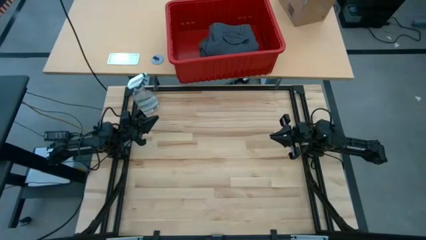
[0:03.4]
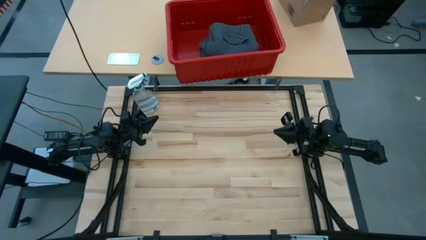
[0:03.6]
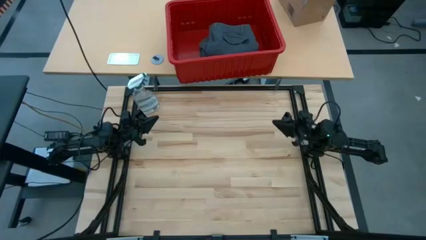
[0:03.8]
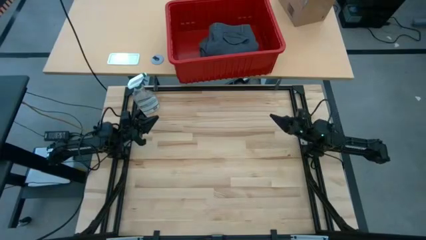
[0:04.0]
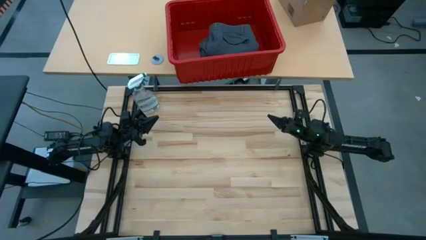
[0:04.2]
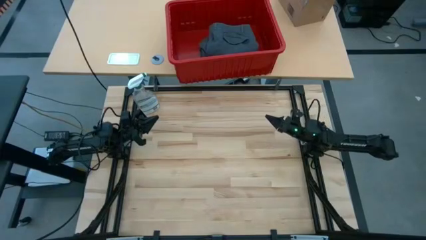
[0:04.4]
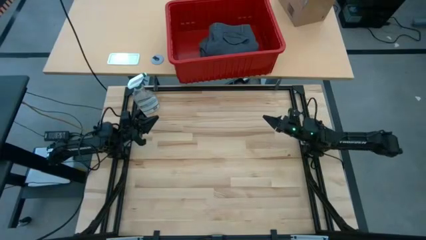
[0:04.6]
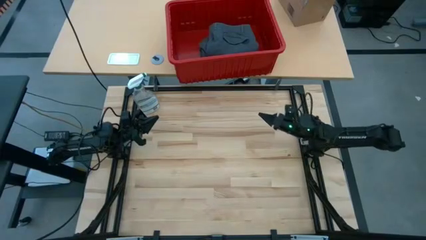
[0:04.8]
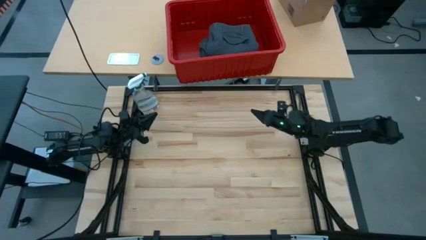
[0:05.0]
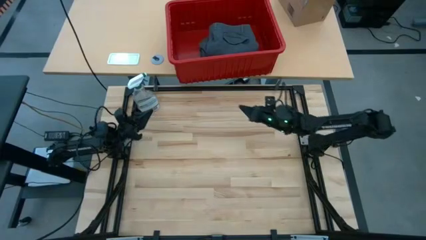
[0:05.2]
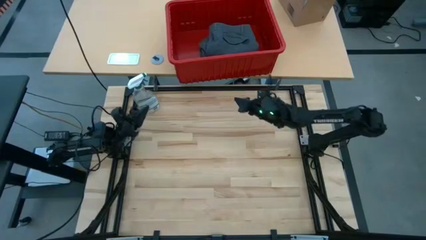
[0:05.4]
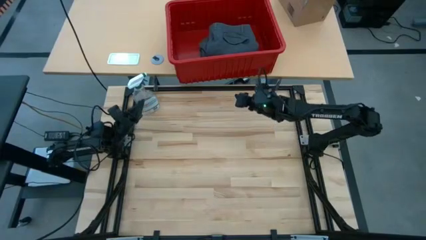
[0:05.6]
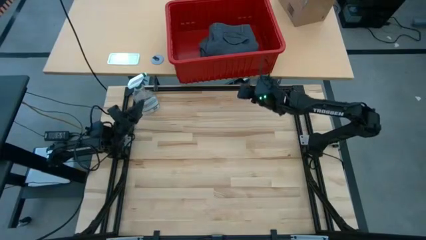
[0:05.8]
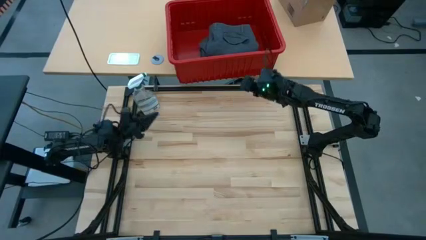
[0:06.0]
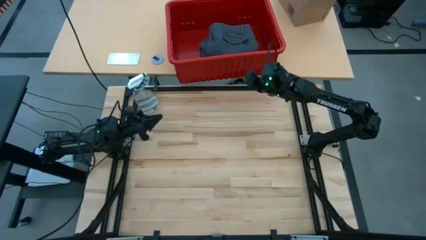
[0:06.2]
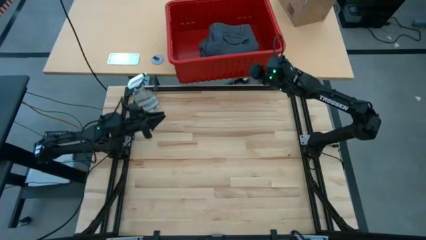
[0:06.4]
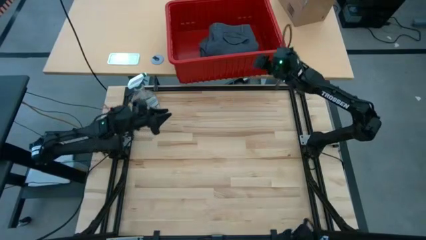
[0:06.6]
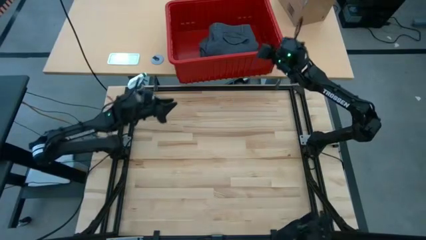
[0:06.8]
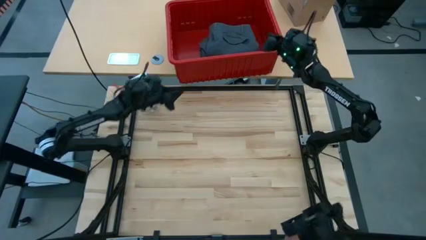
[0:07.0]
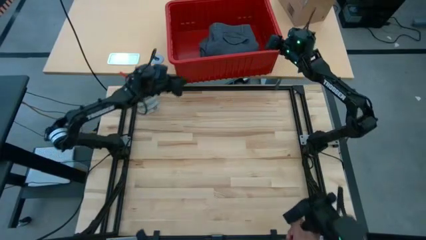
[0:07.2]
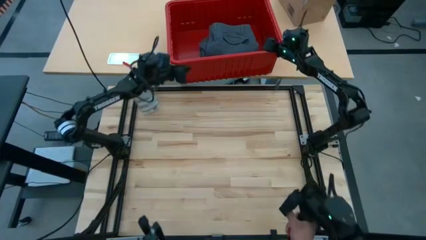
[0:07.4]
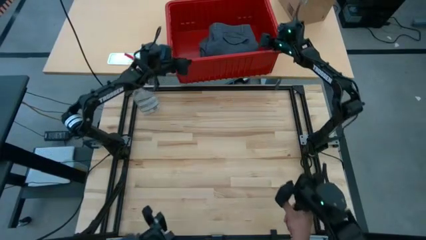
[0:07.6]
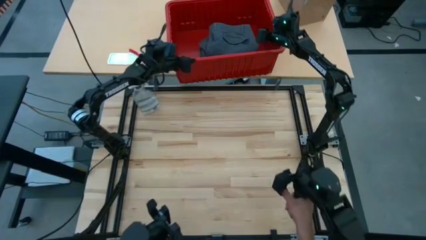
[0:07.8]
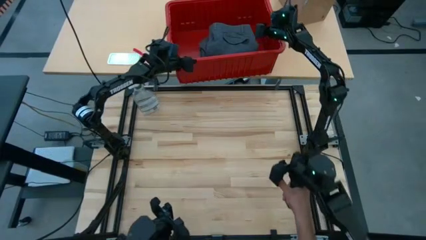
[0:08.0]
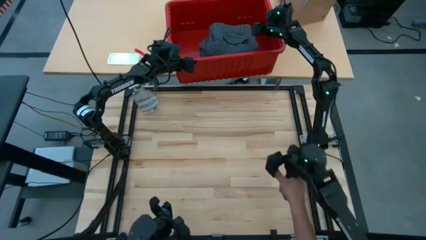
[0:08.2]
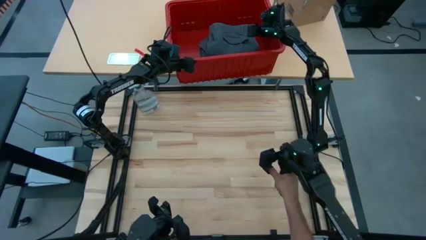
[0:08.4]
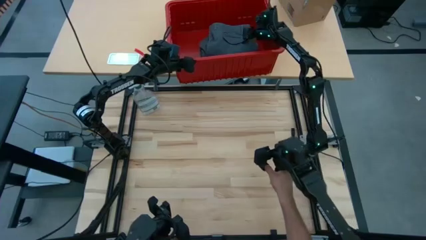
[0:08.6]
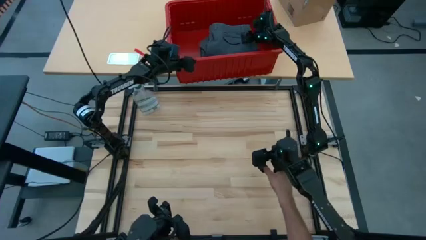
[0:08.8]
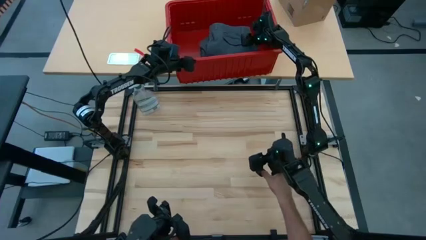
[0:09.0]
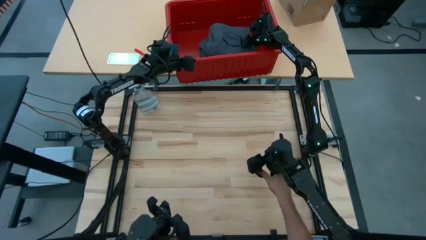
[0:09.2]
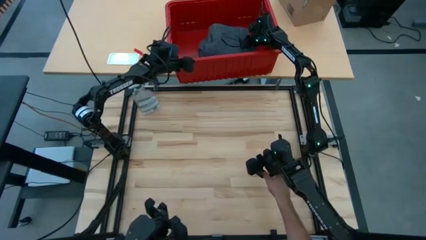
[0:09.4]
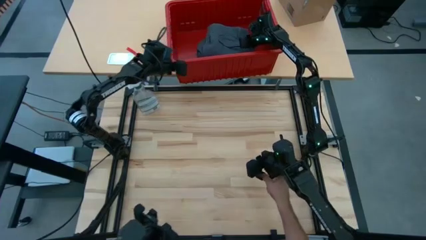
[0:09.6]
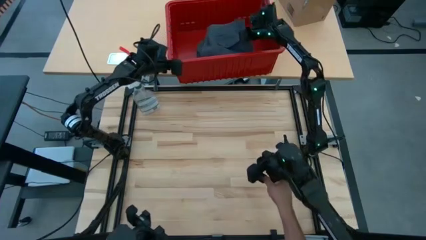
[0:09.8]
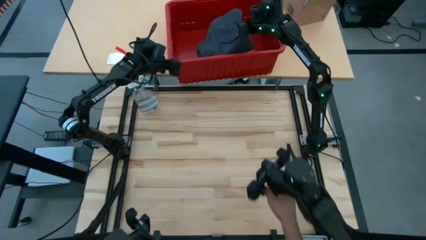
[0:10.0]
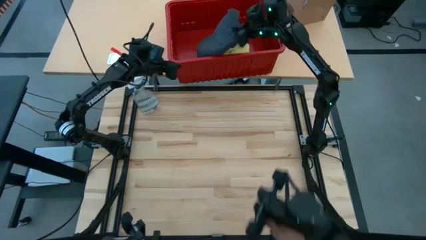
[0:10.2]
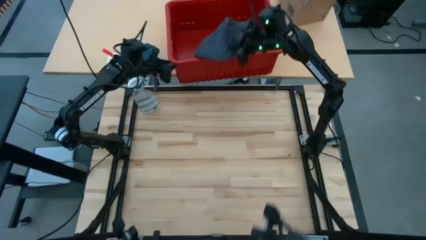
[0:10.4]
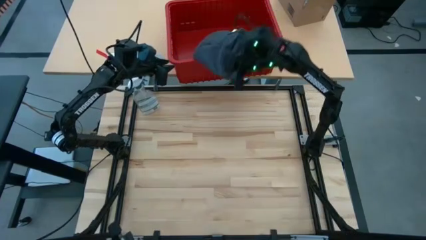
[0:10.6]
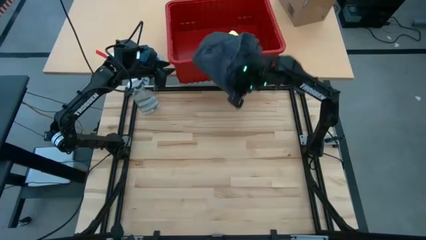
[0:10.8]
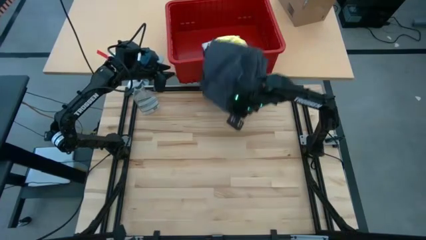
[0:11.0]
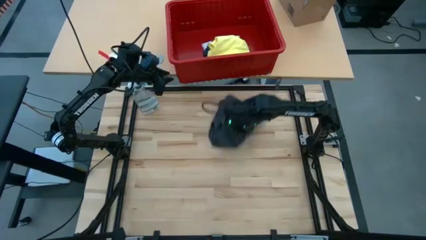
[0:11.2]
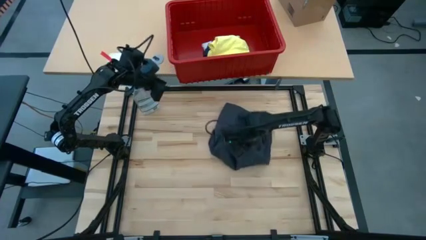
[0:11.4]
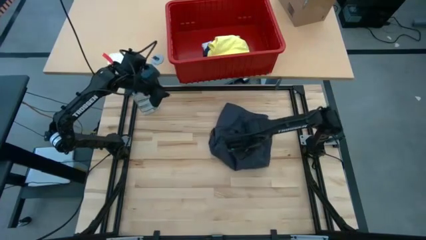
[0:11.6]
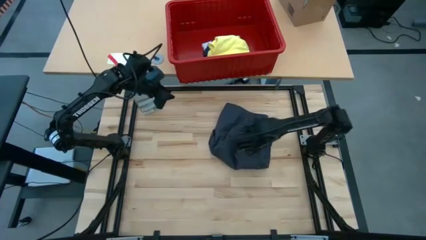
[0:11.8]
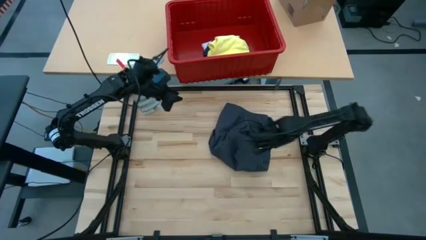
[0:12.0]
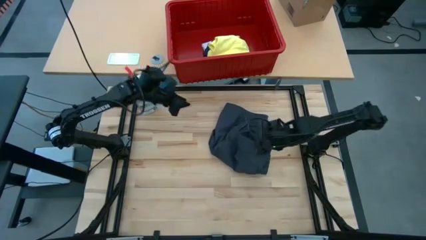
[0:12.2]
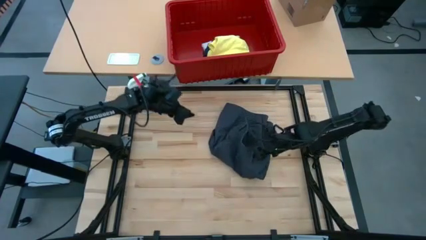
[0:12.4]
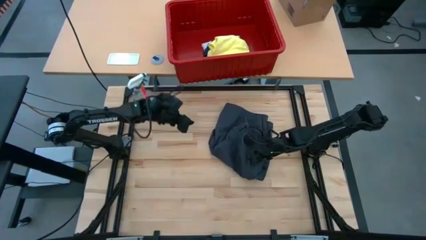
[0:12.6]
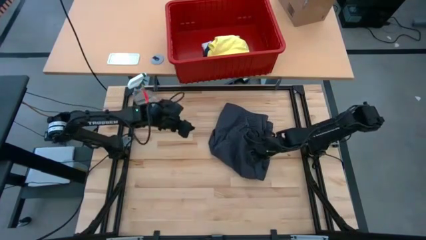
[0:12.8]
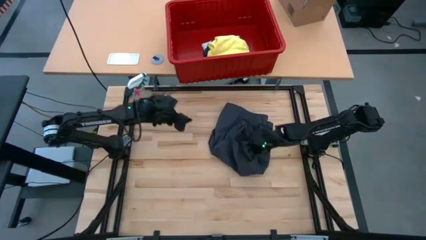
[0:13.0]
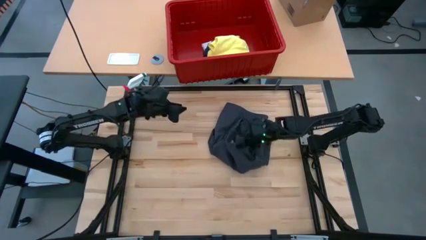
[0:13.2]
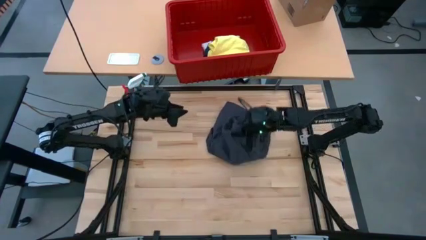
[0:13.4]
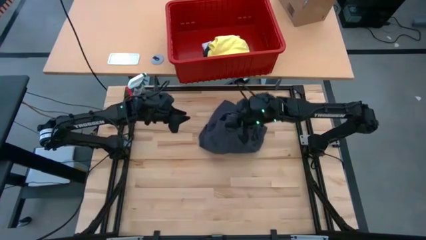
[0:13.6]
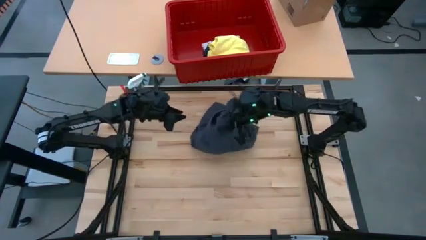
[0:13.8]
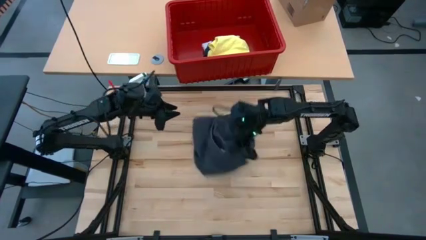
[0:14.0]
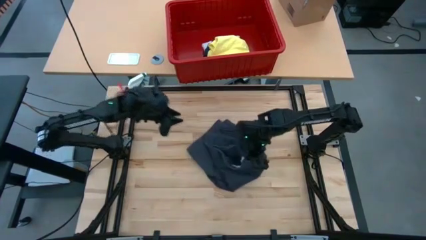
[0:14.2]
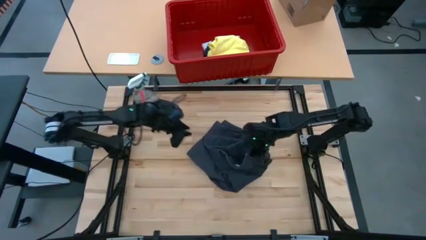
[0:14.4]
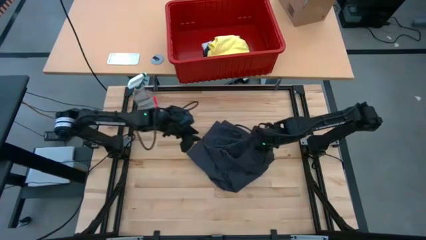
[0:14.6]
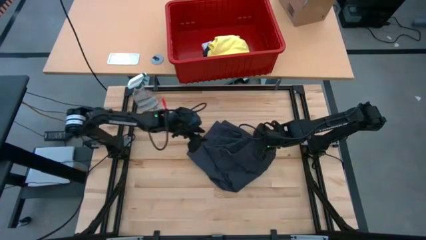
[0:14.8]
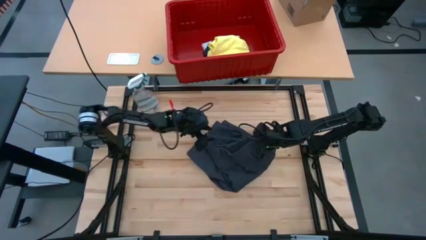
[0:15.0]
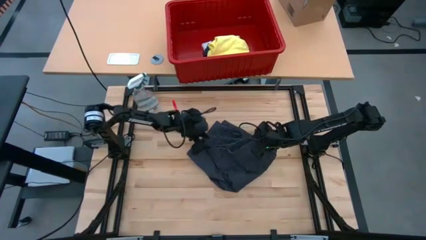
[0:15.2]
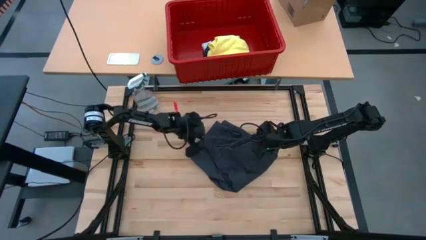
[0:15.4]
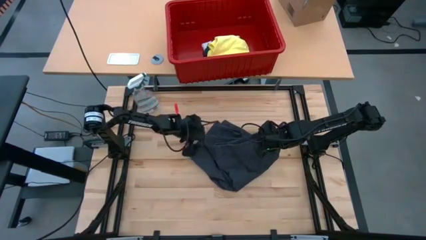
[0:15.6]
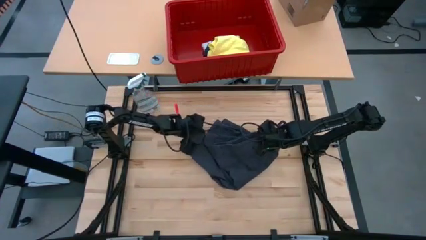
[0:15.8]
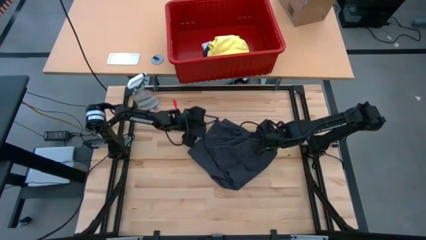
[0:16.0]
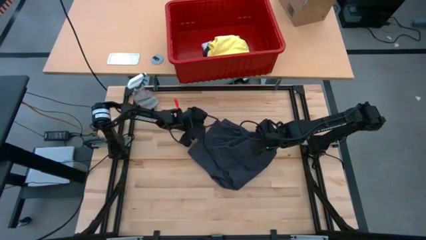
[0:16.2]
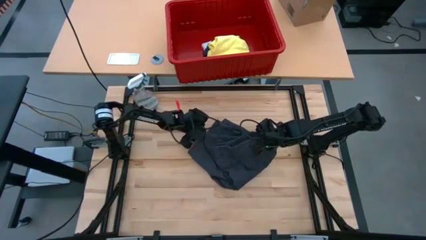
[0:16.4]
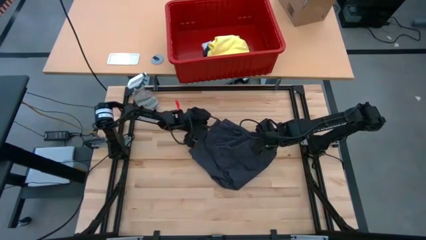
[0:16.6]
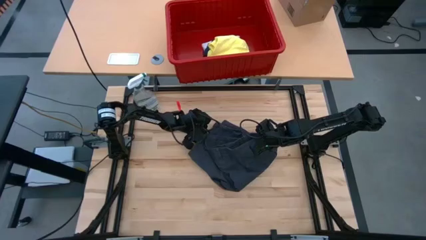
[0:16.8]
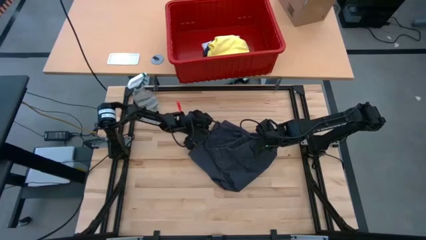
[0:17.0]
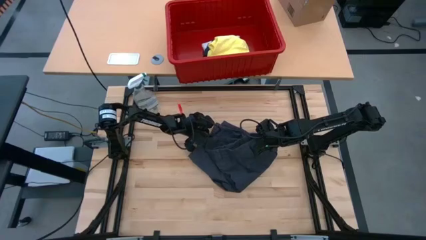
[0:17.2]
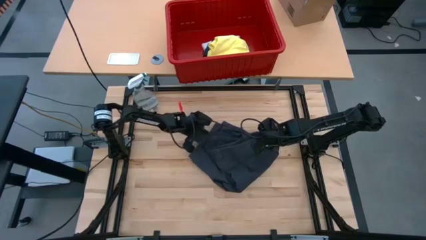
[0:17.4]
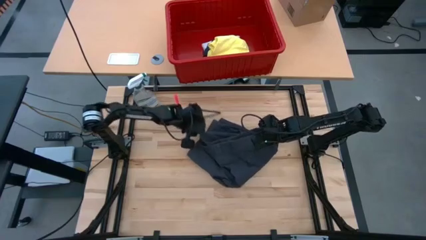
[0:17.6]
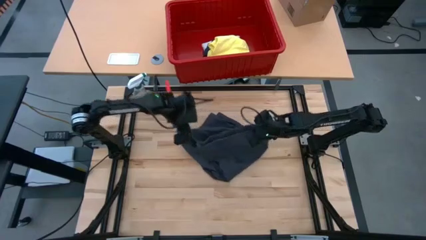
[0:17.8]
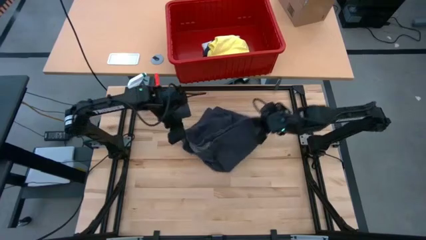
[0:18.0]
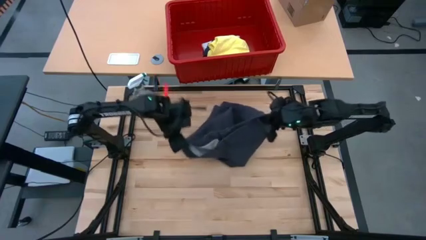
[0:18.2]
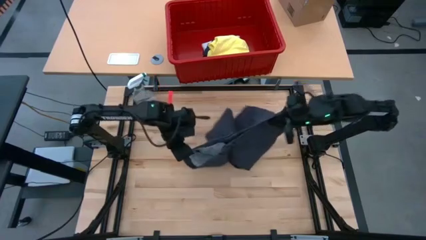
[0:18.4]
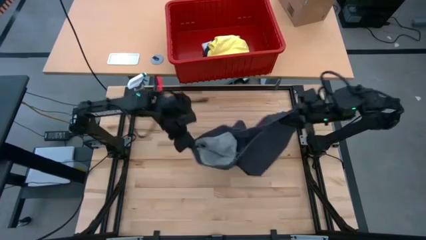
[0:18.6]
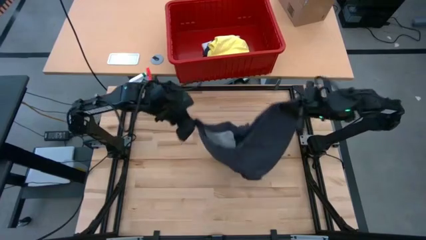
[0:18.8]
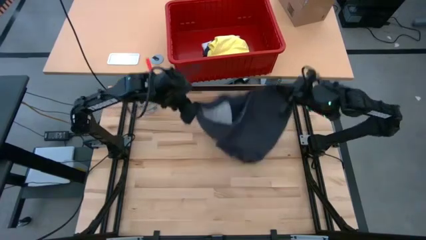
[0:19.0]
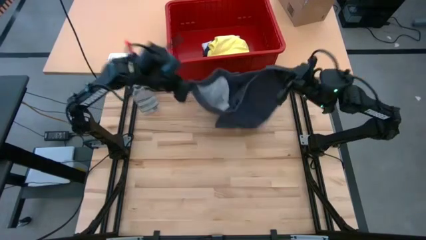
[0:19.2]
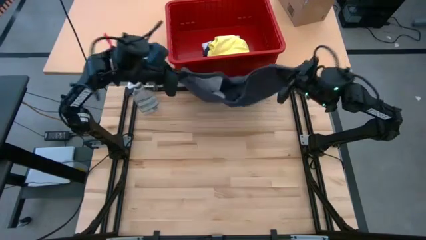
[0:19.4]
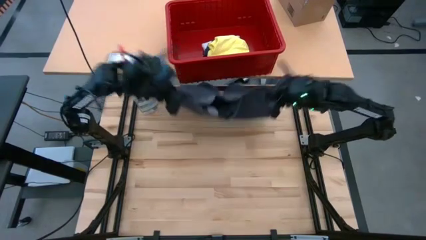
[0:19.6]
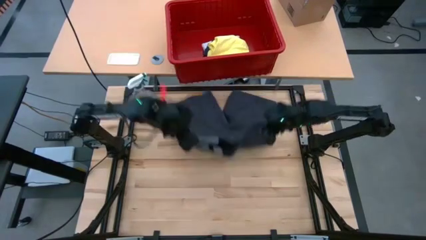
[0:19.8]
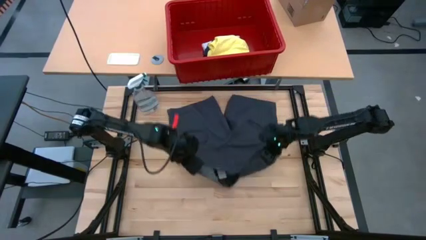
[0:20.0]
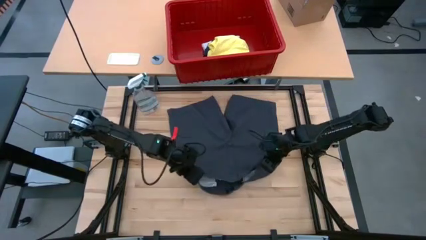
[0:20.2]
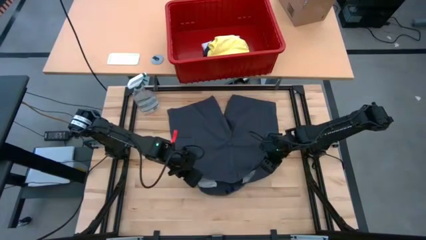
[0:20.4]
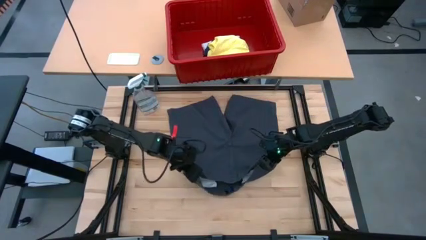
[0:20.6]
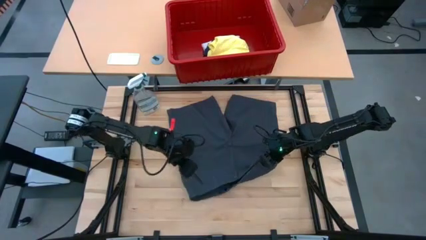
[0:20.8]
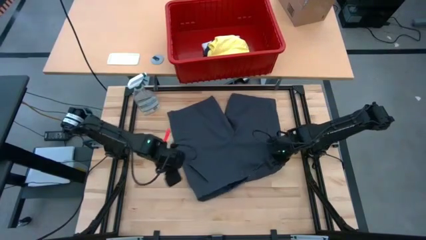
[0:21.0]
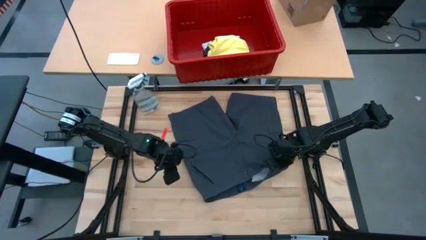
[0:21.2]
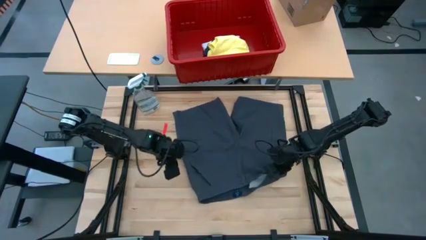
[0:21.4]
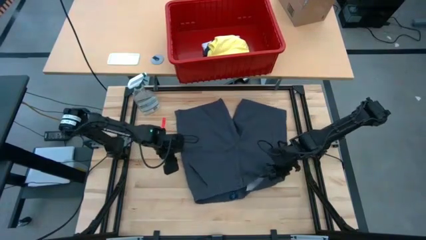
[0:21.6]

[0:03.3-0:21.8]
Task: Fold Laundry from Bin
Fold the black short
